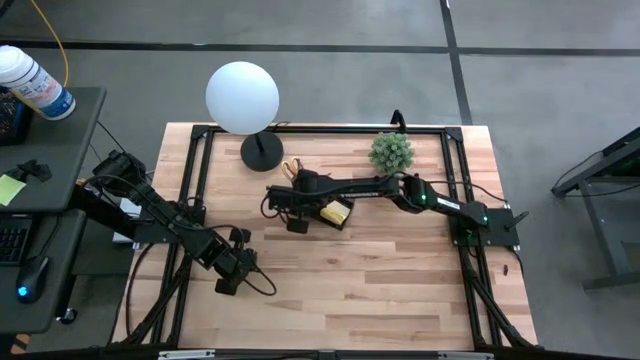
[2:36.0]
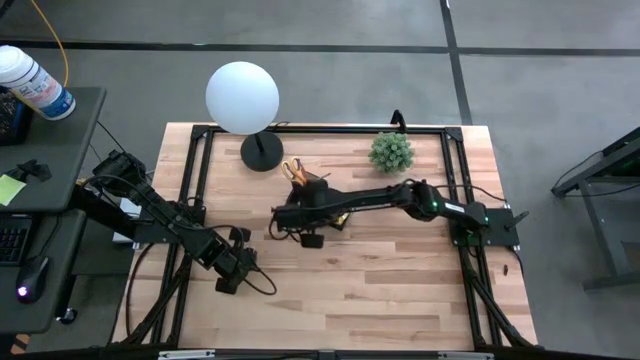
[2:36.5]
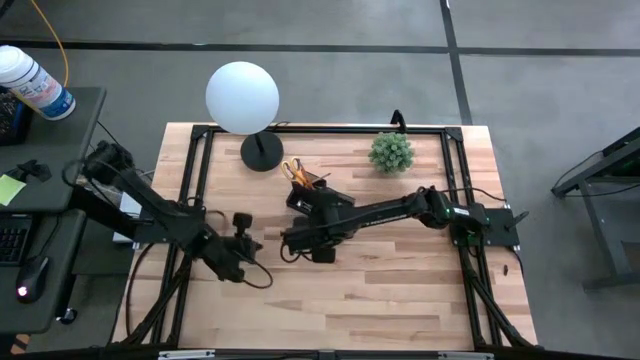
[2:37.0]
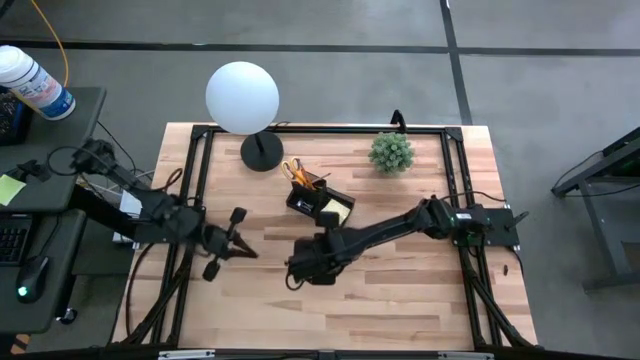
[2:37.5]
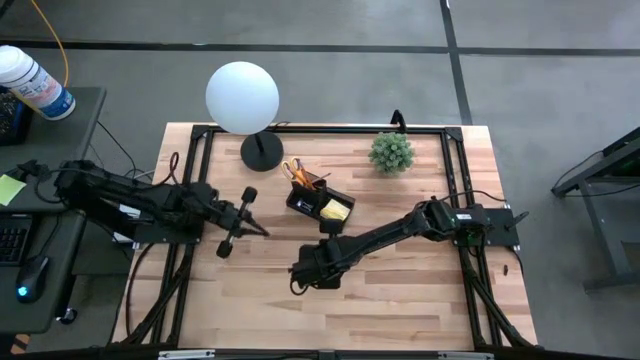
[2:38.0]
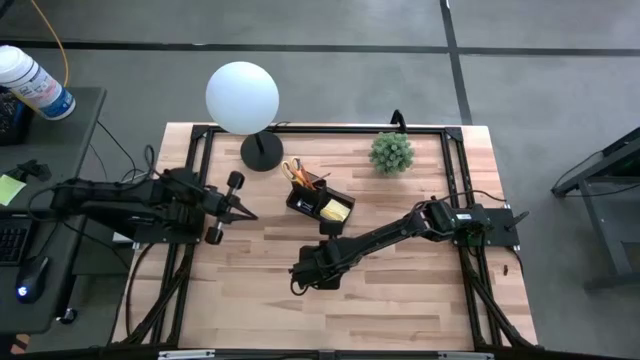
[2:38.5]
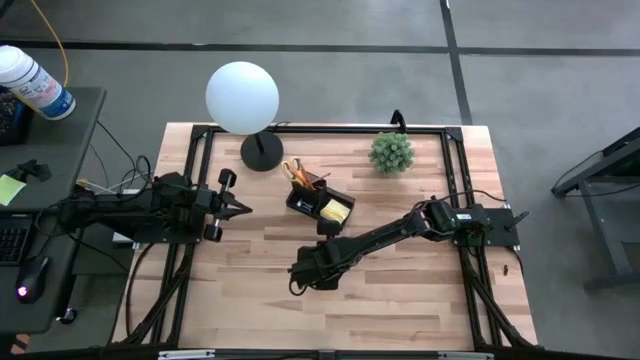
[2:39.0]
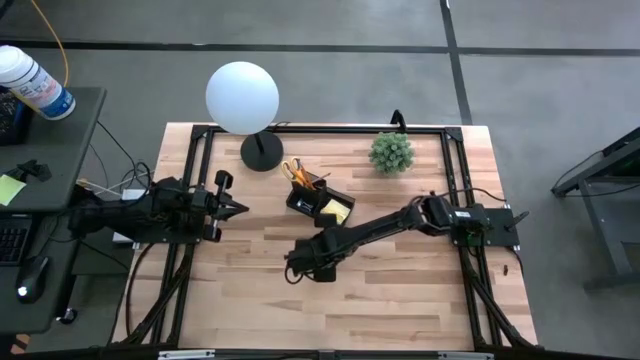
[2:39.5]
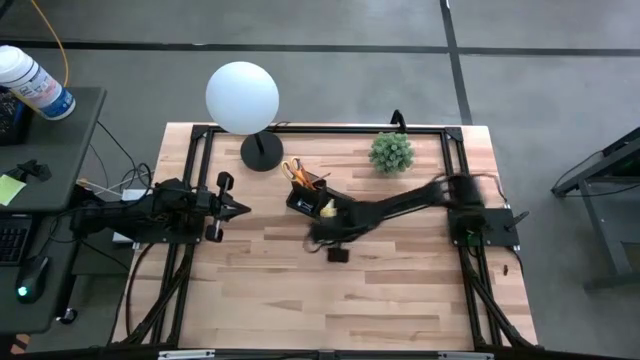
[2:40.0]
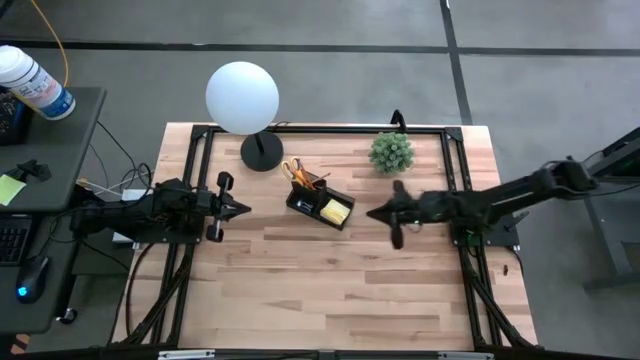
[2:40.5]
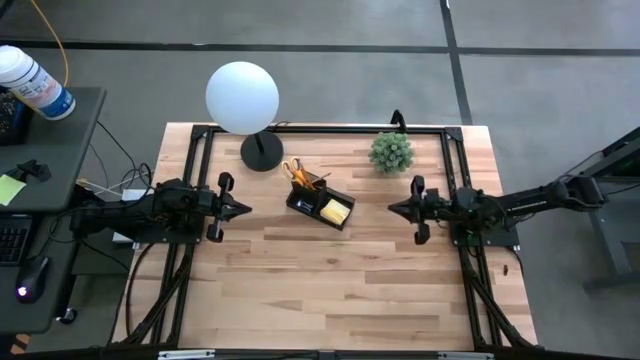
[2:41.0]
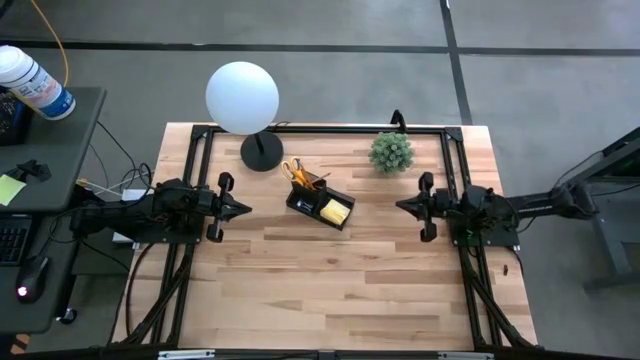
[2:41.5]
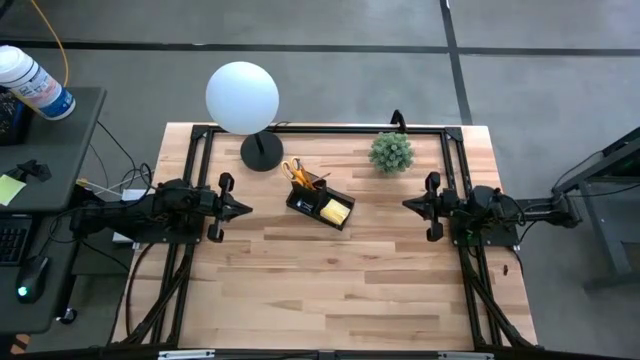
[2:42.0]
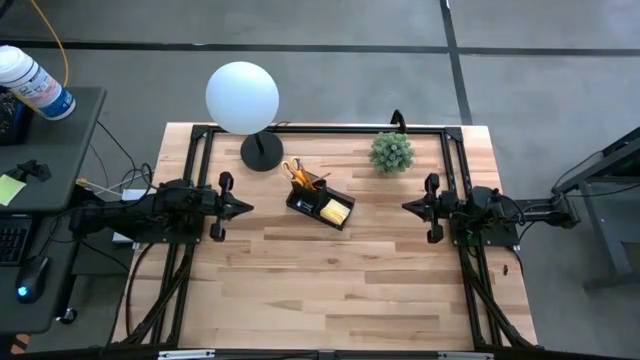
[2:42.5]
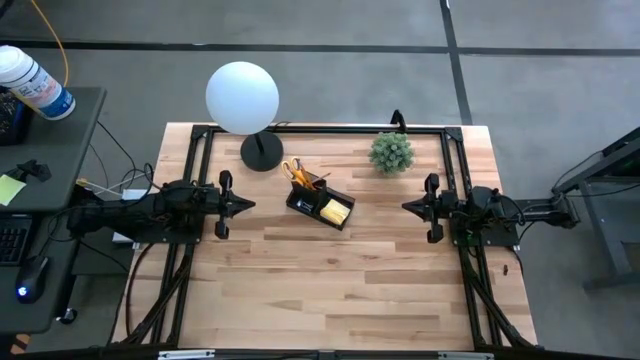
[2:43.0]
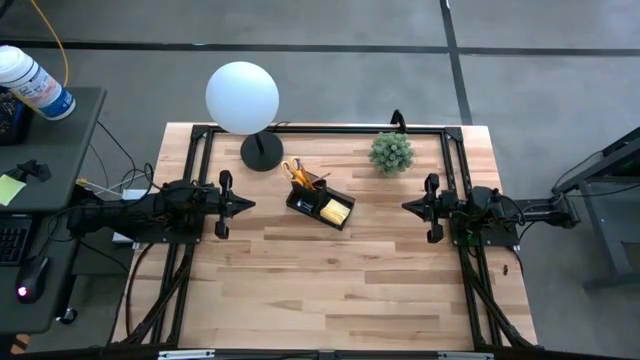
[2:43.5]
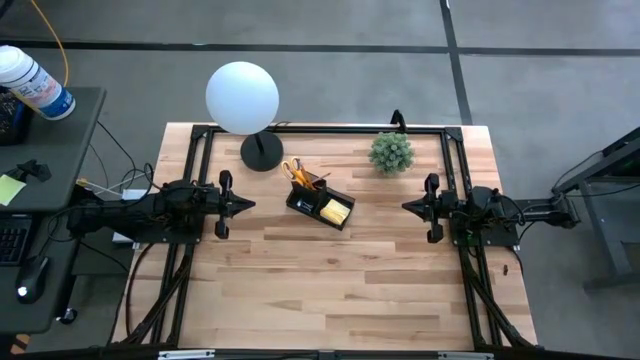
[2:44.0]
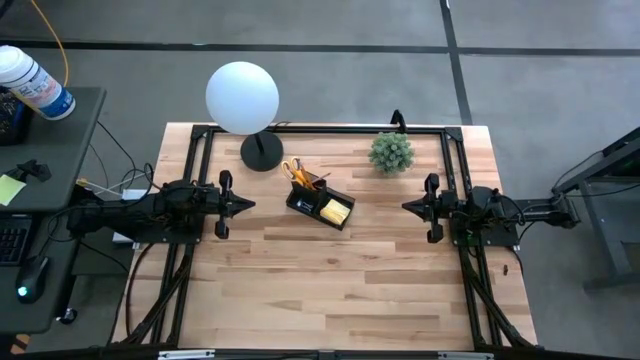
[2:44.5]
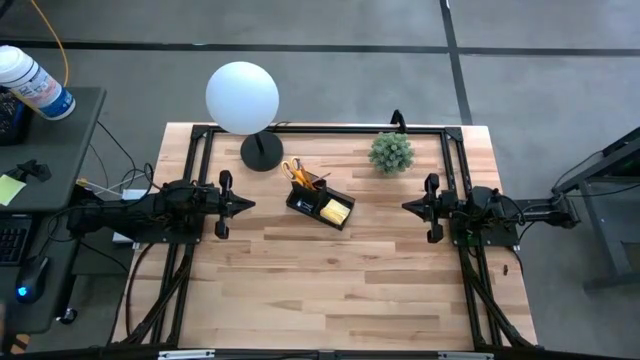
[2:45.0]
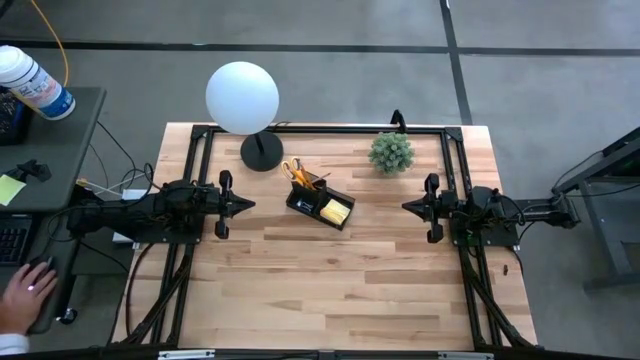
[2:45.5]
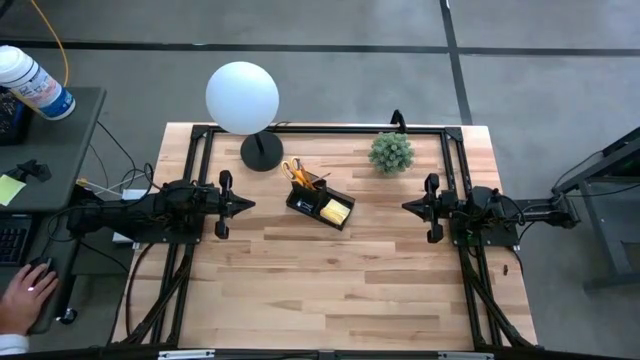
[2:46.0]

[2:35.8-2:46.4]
Task: Pick and place office supplies into organizer
Return to Home Position

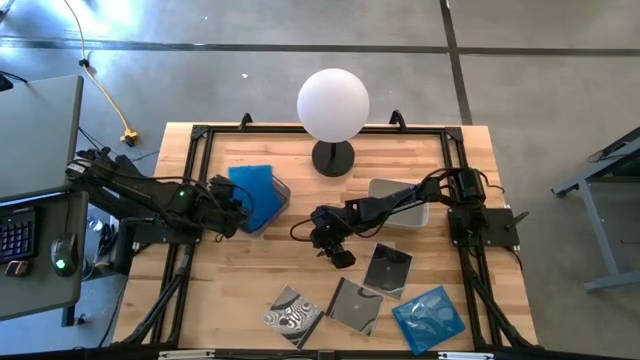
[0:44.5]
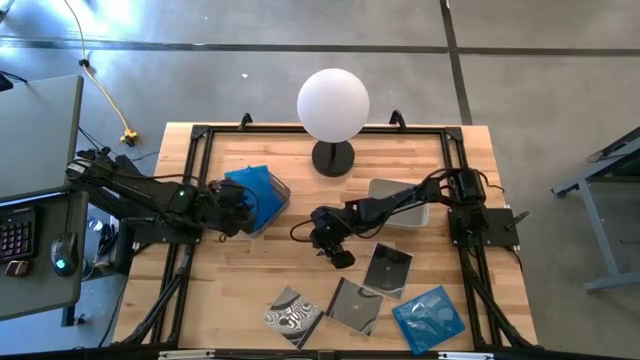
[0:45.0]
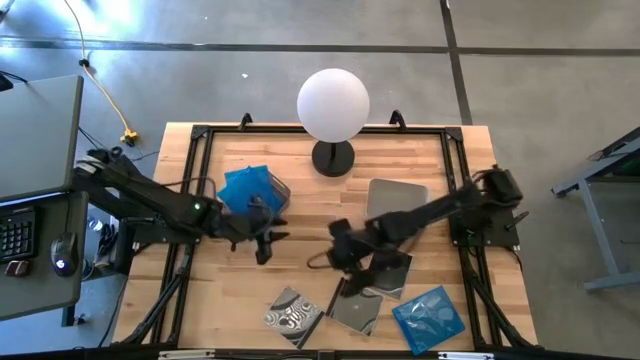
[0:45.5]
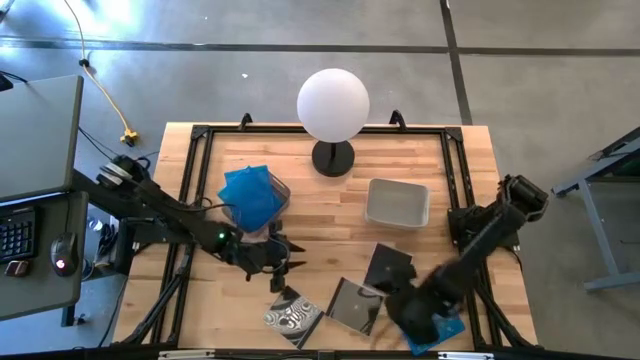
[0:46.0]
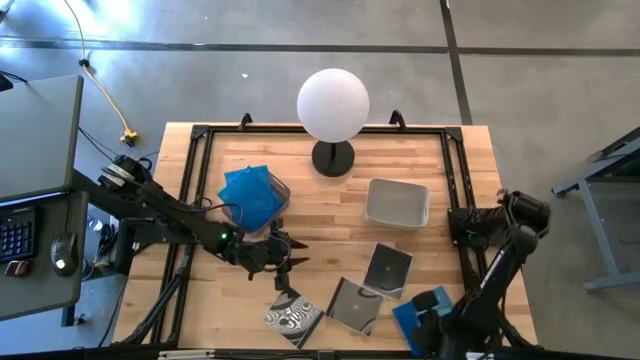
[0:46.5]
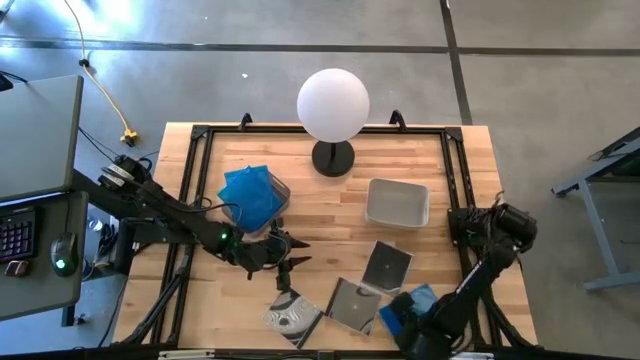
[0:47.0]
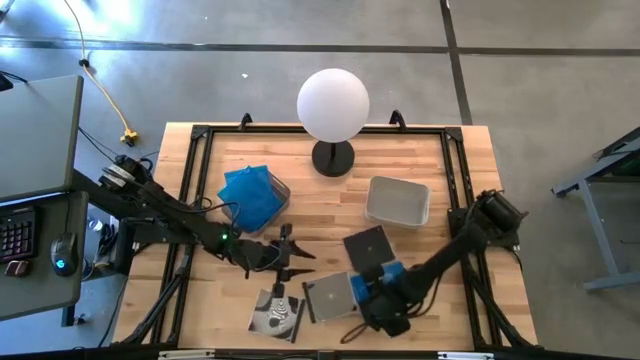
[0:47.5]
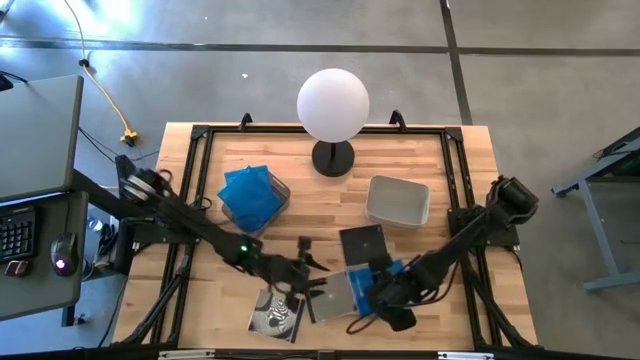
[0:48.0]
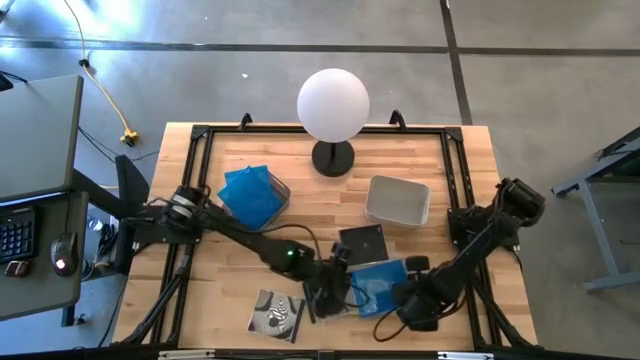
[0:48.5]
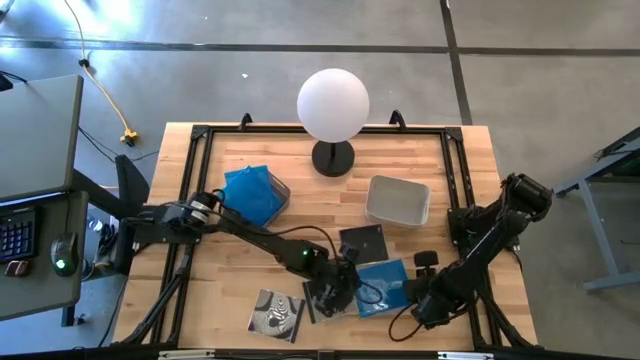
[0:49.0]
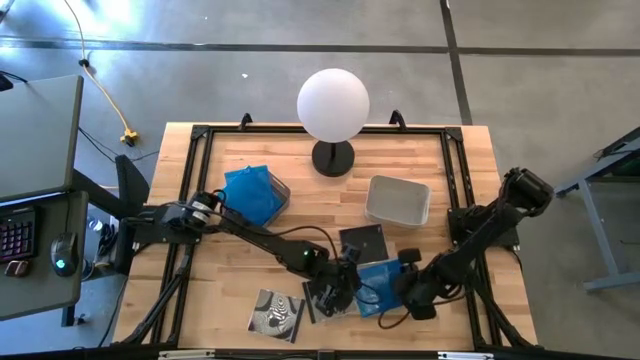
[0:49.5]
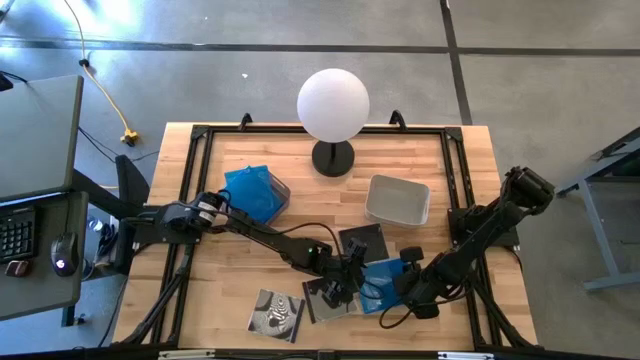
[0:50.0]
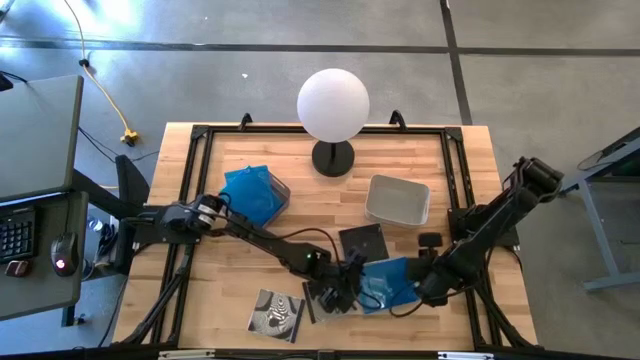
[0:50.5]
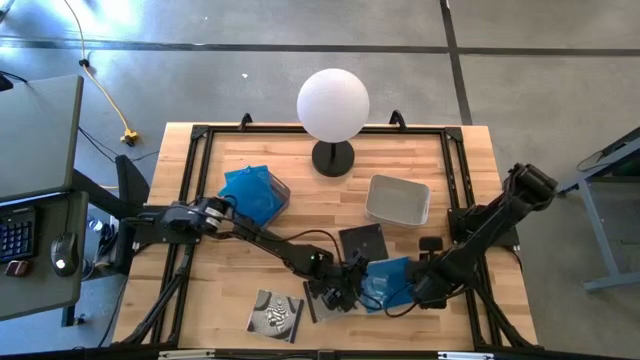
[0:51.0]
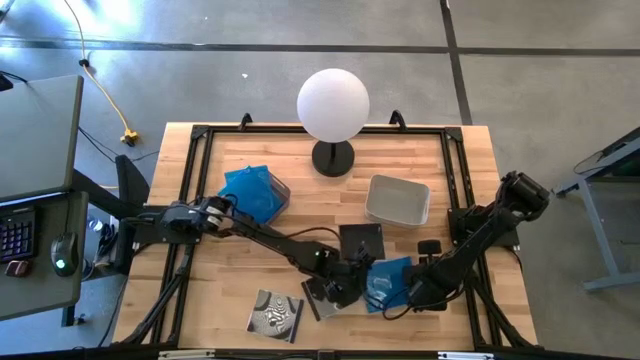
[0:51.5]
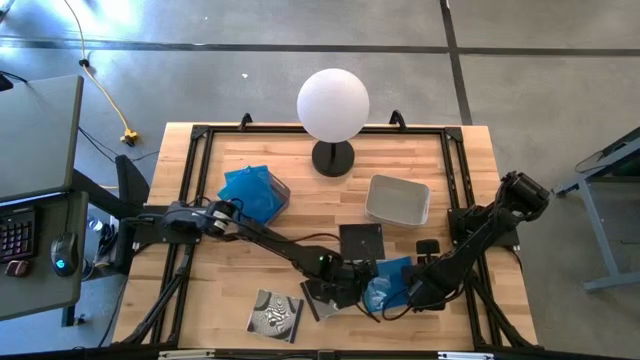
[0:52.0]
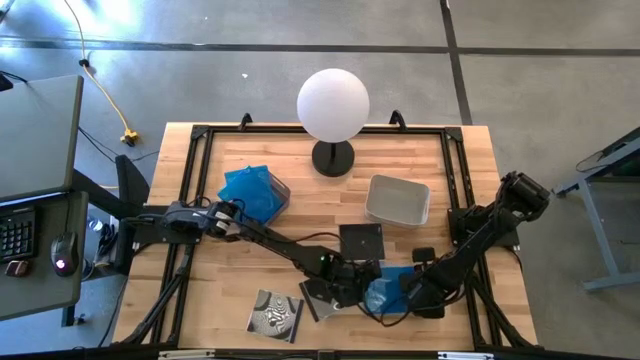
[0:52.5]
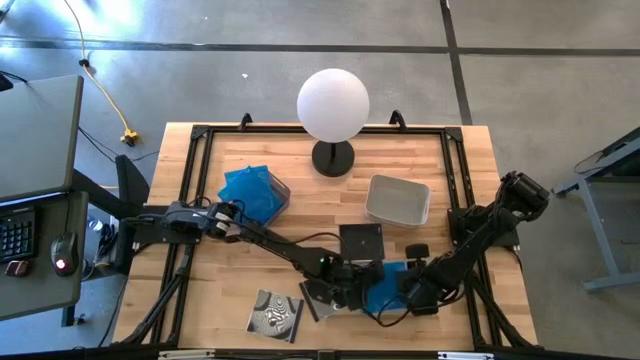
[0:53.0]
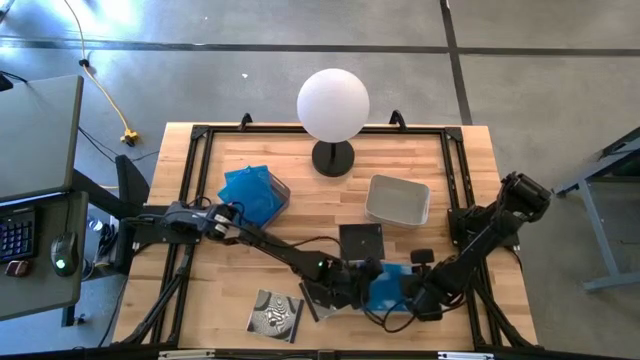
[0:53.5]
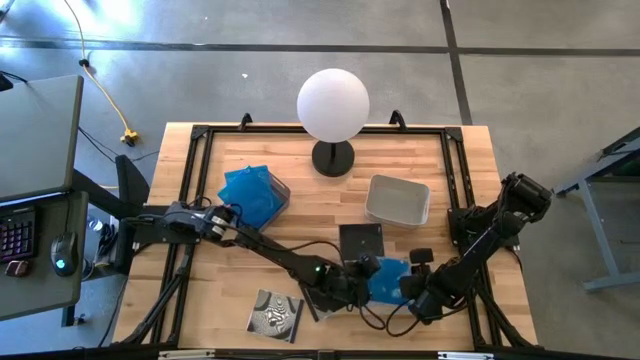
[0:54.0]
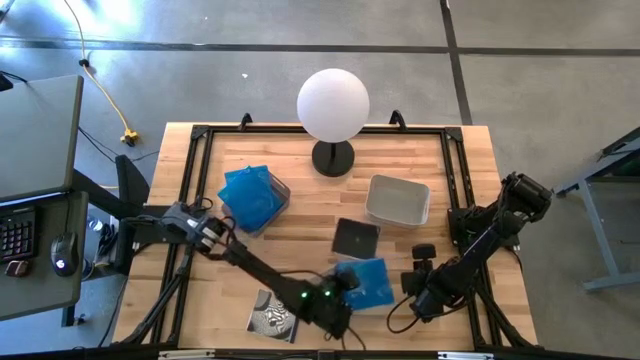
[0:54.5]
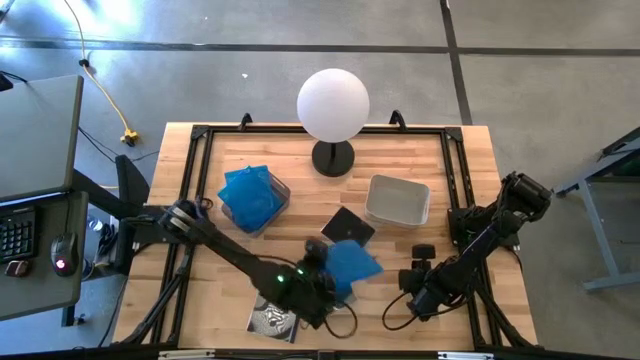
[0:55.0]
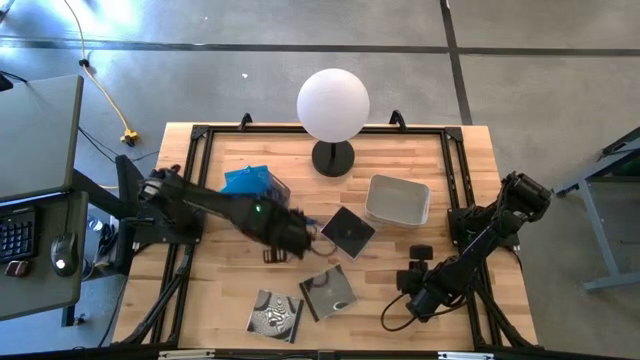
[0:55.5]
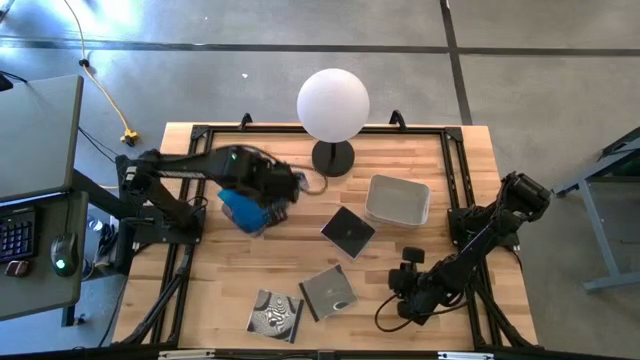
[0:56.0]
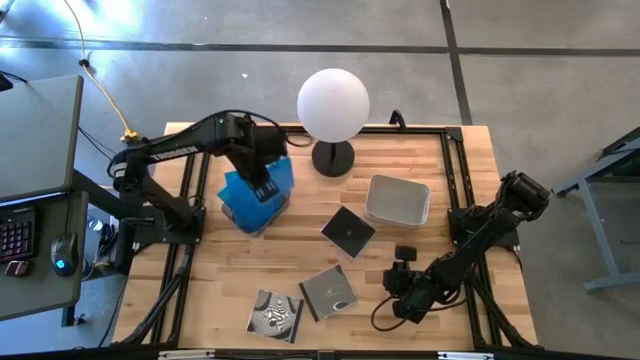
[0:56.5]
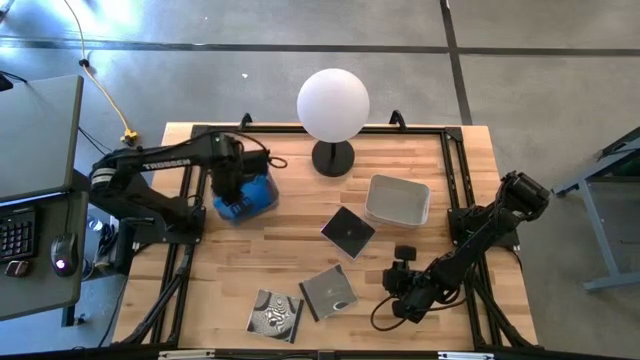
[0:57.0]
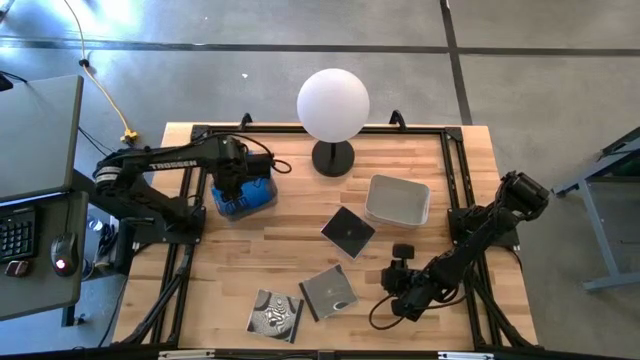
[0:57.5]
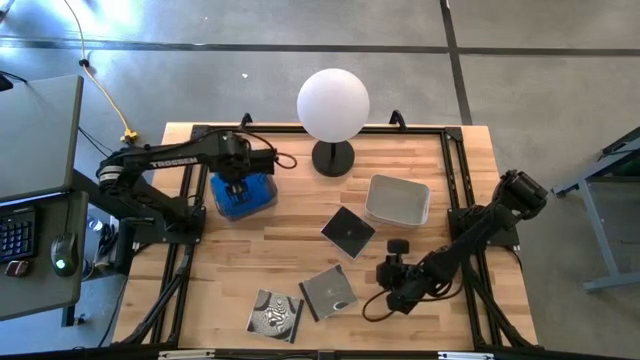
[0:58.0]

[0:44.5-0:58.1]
Task: Pick & place jewel cases by type
Put the blue cd case into the black bin
